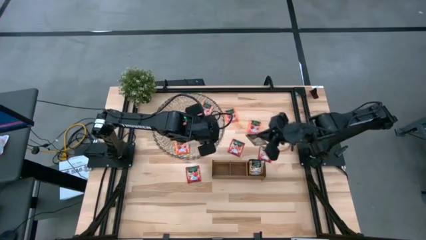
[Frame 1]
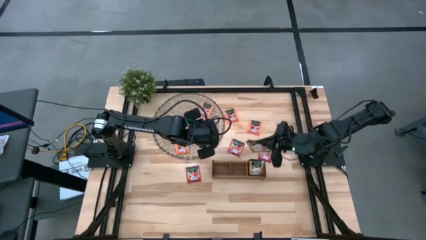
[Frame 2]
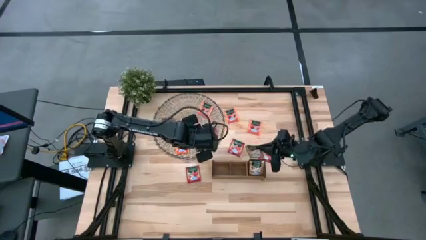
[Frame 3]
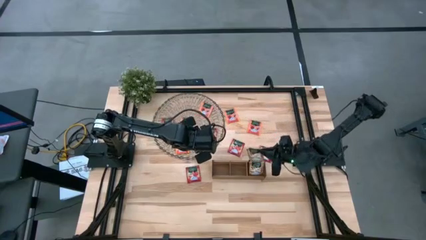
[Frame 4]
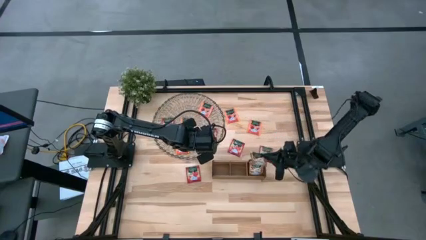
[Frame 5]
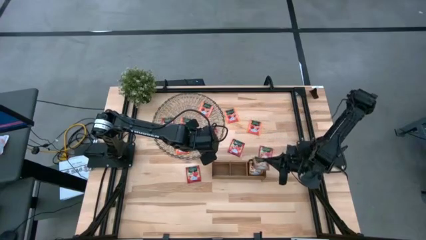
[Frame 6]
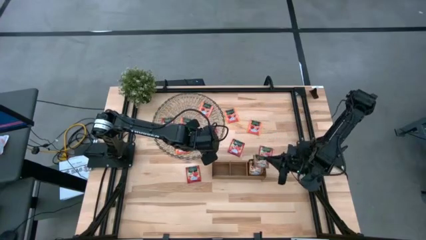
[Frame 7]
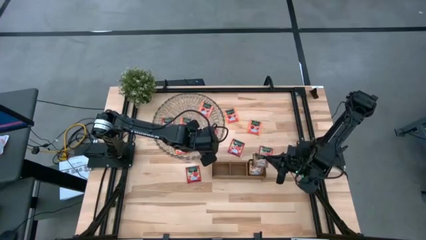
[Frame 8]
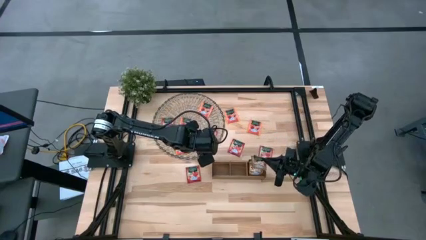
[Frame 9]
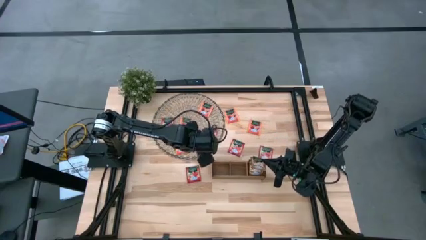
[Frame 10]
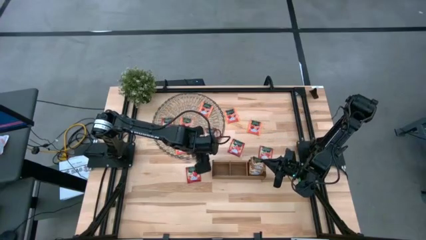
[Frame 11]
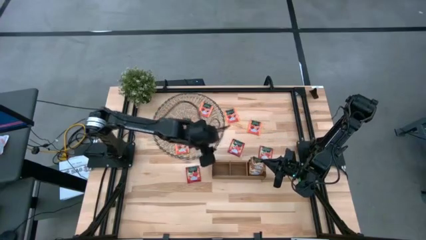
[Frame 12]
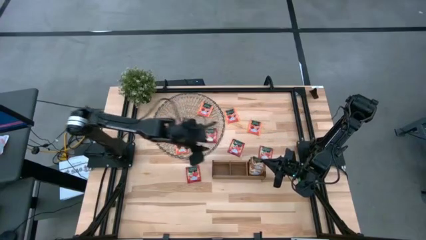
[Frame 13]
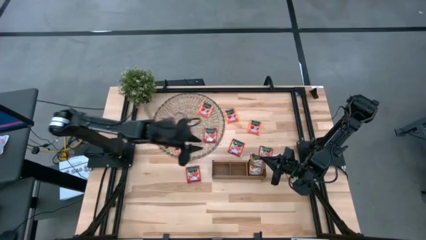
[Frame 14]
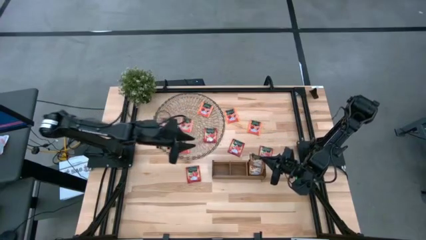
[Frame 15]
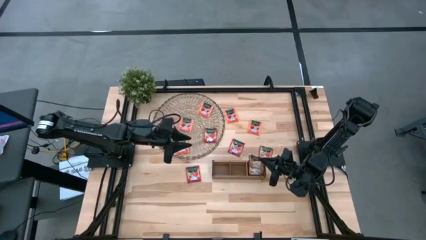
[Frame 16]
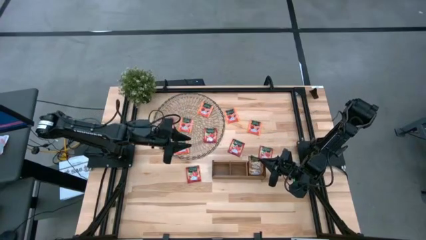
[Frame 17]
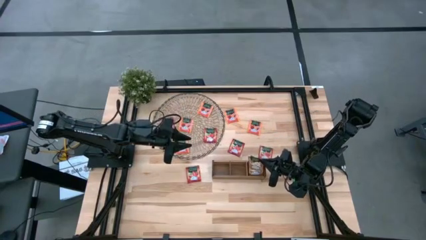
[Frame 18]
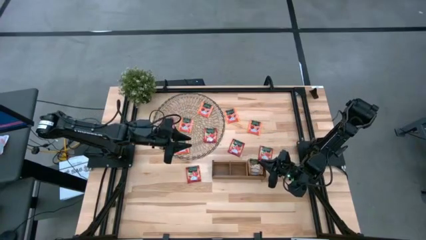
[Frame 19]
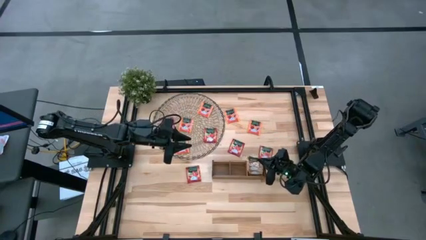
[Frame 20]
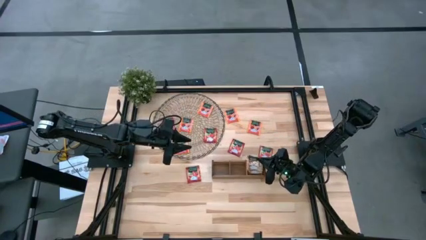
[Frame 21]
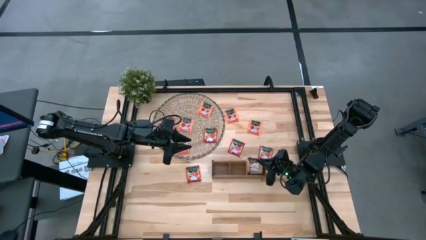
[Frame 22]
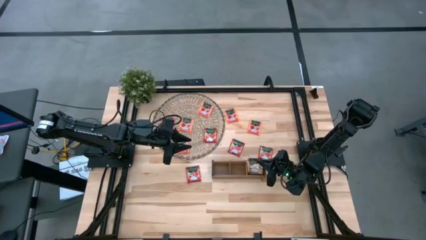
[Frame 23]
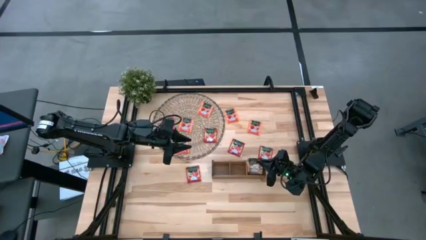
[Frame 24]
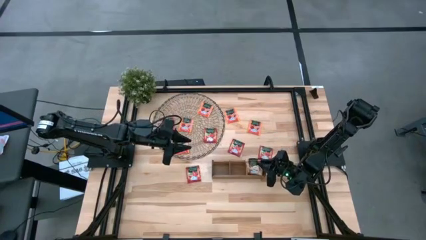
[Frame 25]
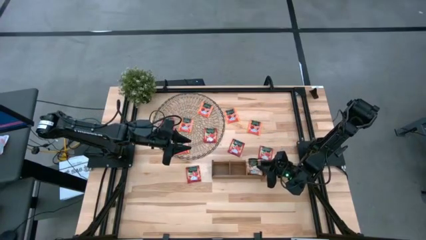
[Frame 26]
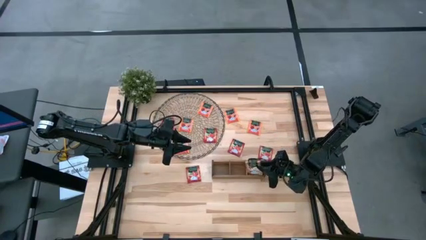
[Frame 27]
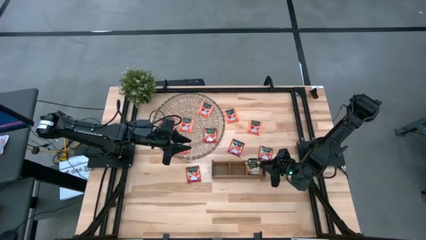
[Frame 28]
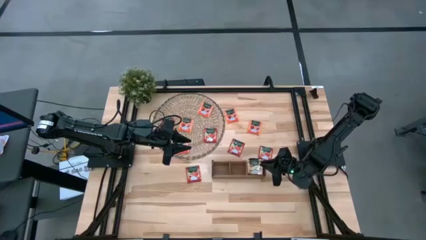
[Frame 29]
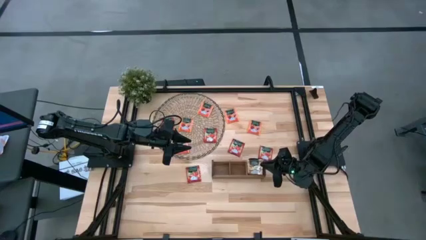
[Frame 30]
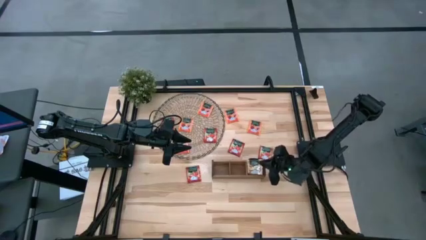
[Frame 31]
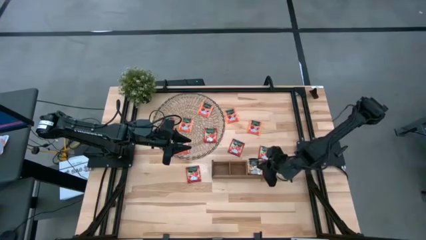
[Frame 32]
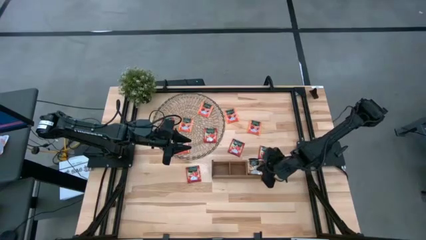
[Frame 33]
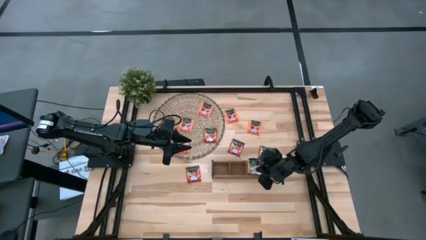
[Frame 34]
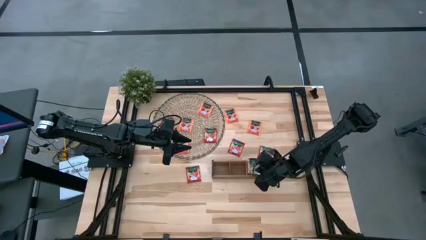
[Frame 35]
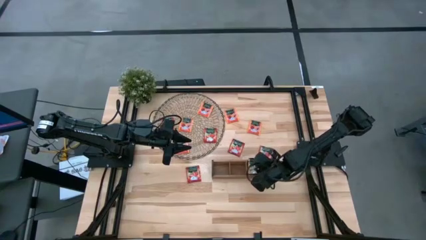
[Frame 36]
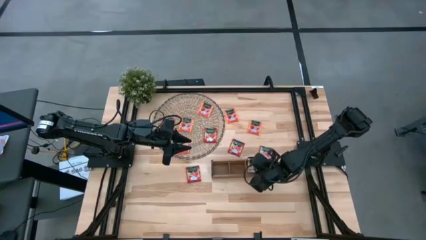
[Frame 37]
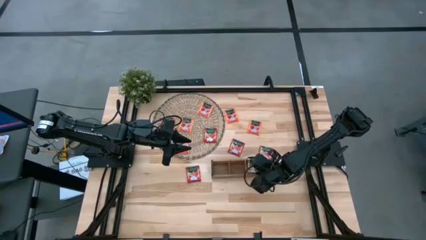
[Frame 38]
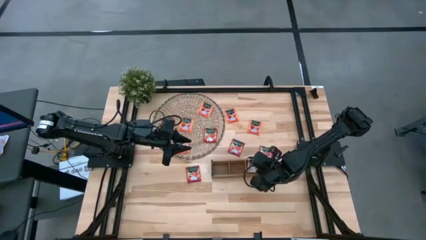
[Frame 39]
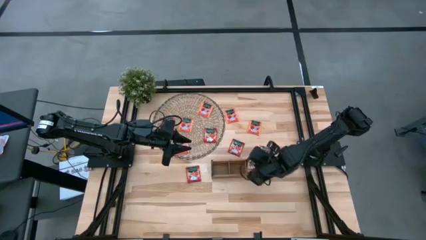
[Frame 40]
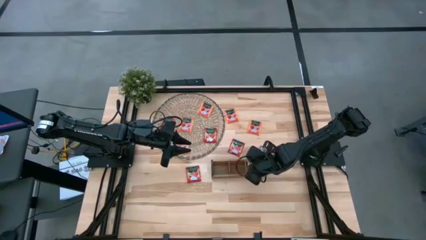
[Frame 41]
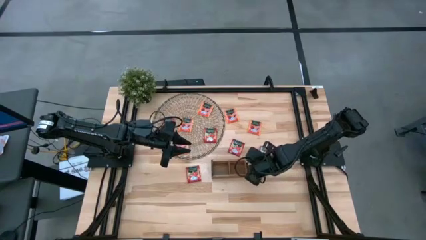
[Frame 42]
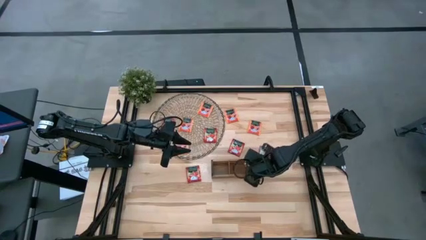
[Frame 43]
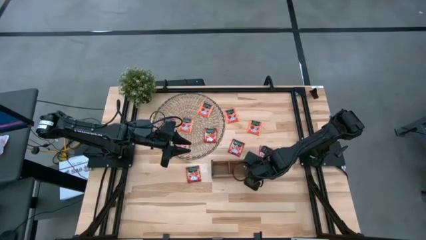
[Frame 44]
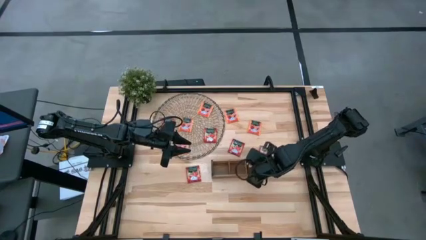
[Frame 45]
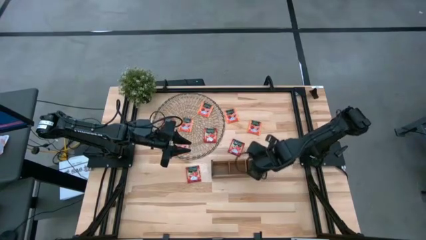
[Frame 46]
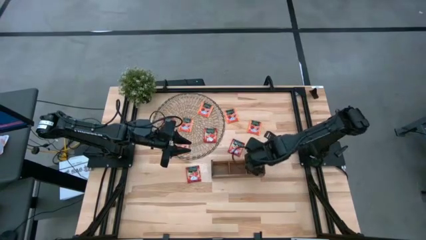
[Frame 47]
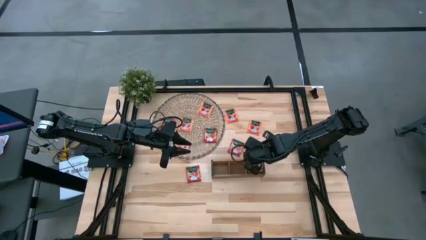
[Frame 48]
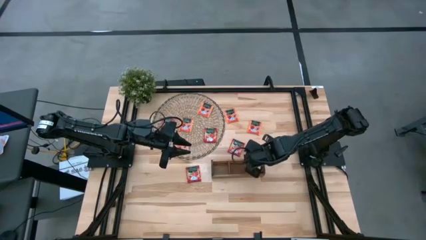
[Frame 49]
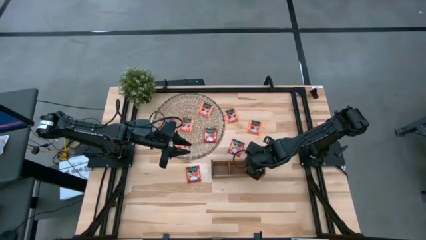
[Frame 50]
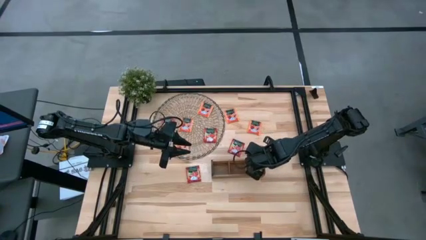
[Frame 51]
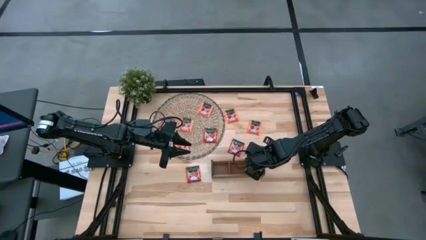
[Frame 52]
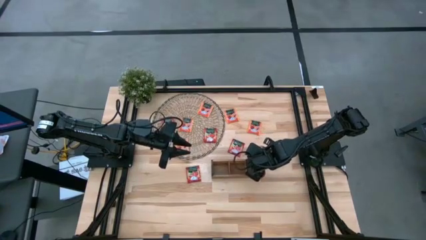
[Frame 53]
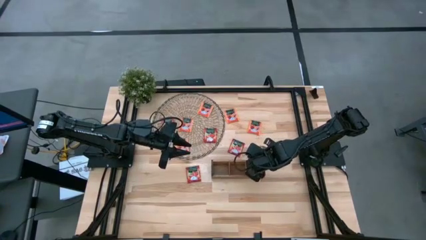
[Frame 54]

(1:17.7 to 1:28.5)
Task: Pick & Place Tea
Put the brown tea bag into the right slot of the wooden organizer
